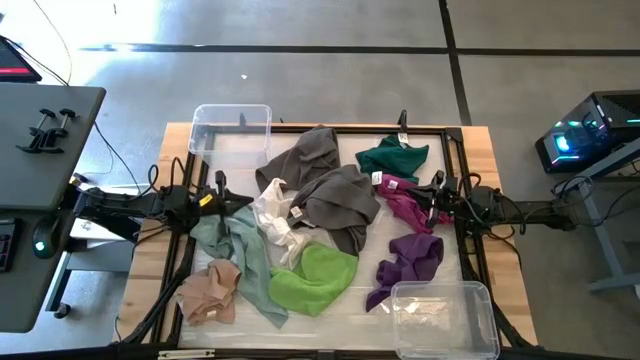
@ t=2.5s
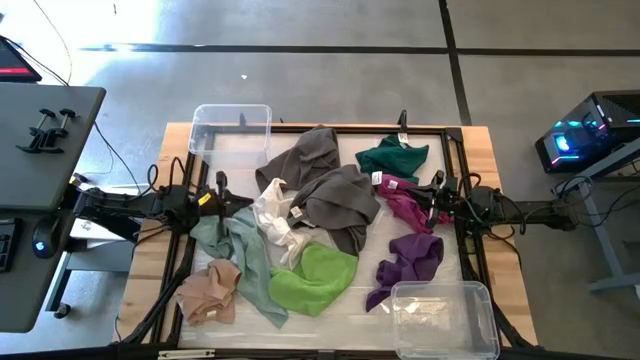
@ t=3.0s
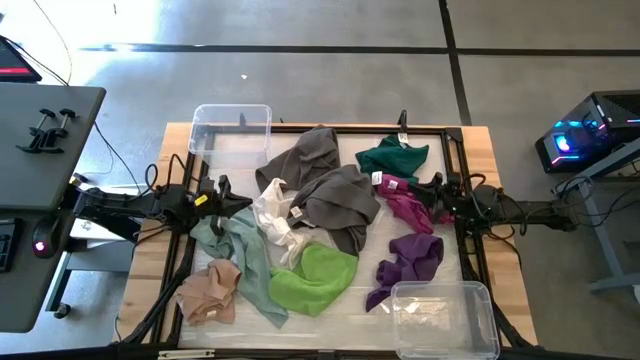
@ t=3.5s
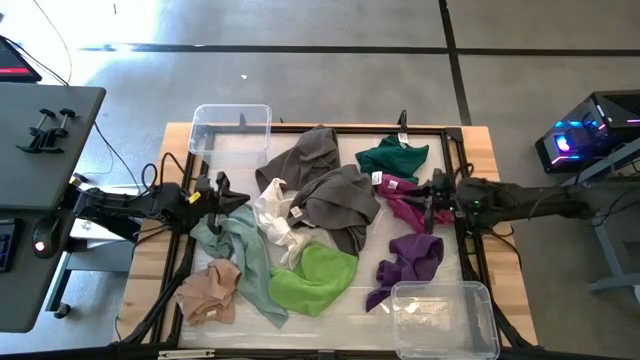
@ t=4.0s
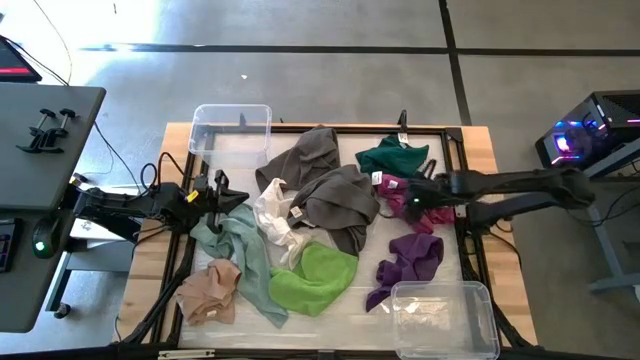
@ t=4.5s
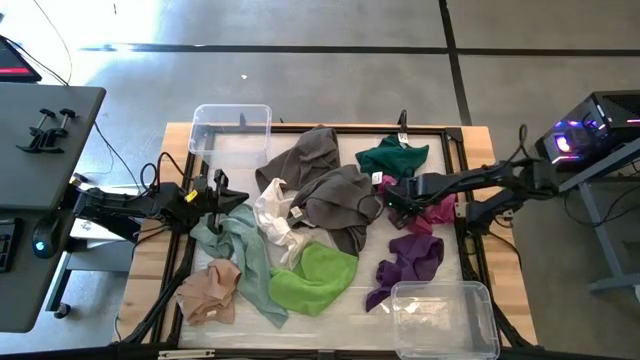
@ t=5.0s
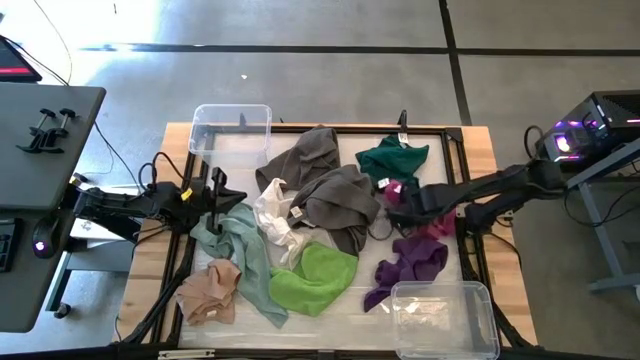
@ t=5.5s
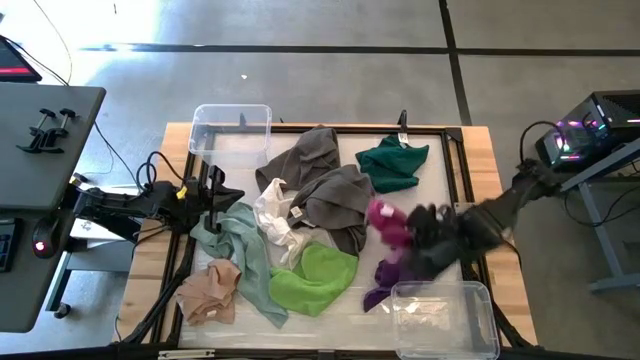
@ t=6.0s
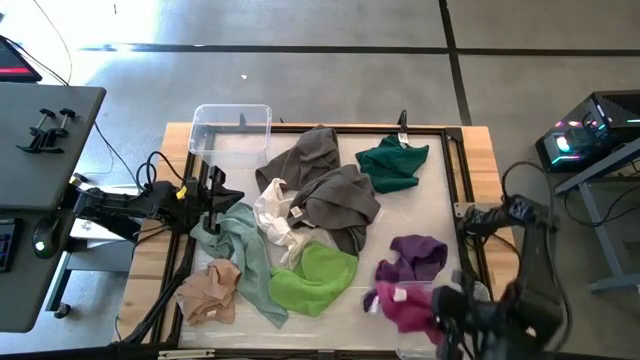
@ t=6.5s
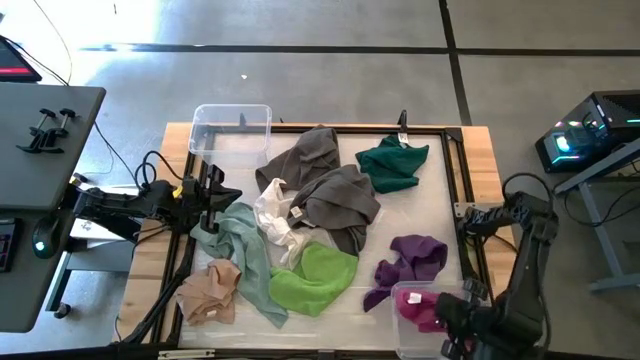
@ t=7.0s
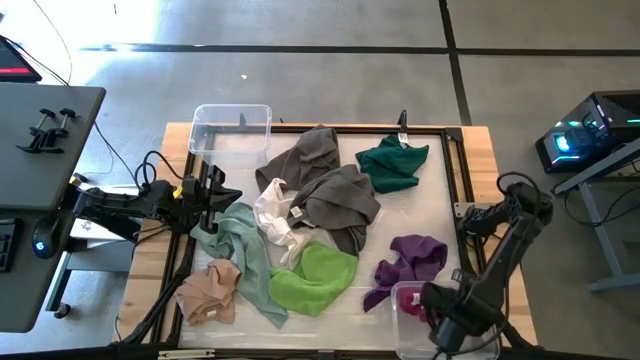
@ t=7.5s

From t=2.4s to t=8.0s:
Task: Sort towels by color in basket
Put the pink towel into the bottom transparent bin

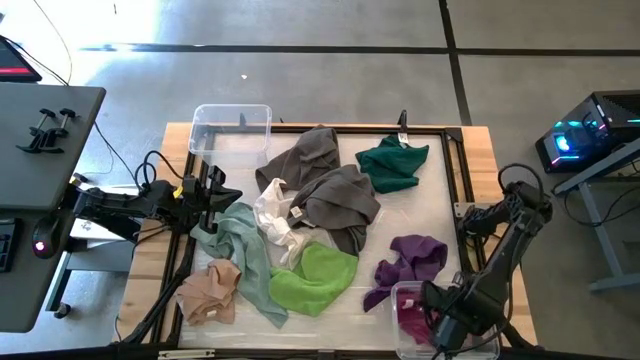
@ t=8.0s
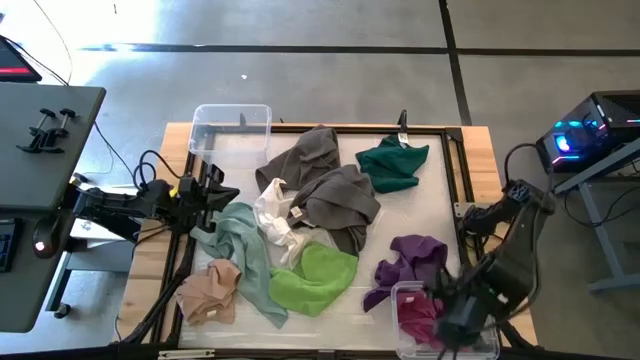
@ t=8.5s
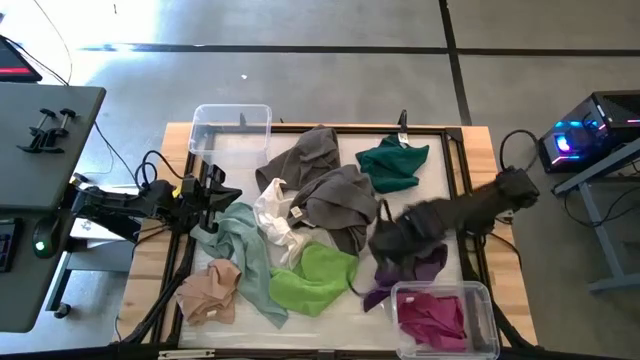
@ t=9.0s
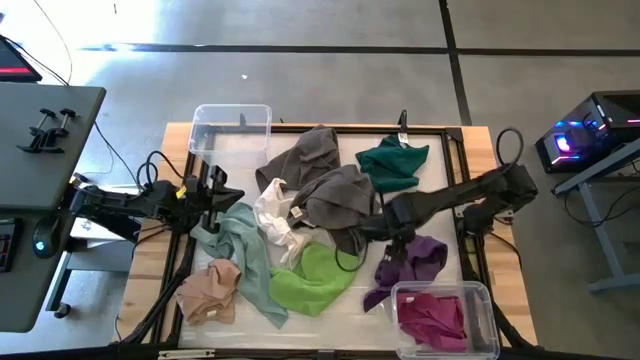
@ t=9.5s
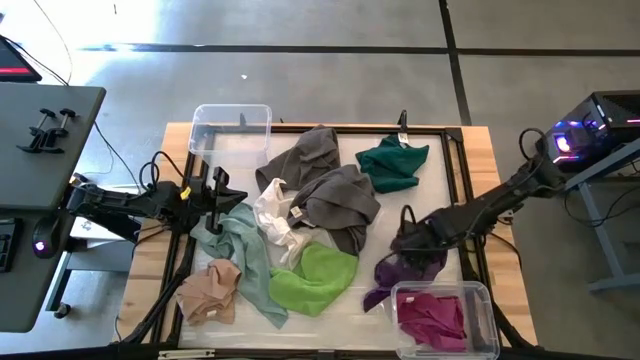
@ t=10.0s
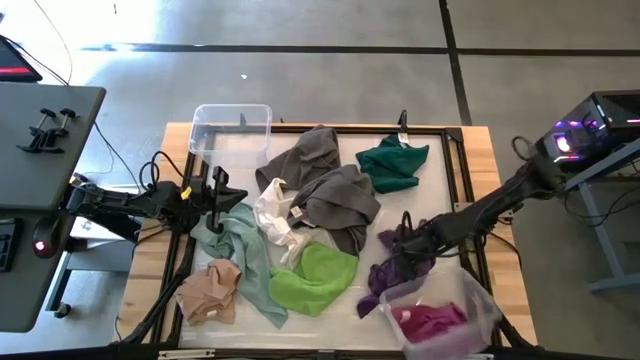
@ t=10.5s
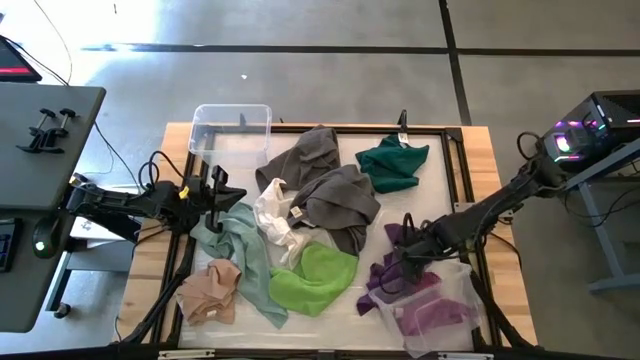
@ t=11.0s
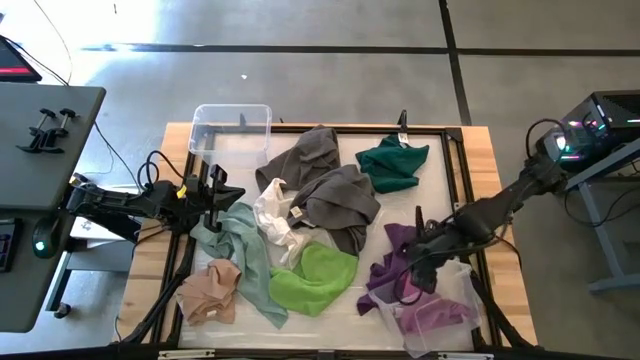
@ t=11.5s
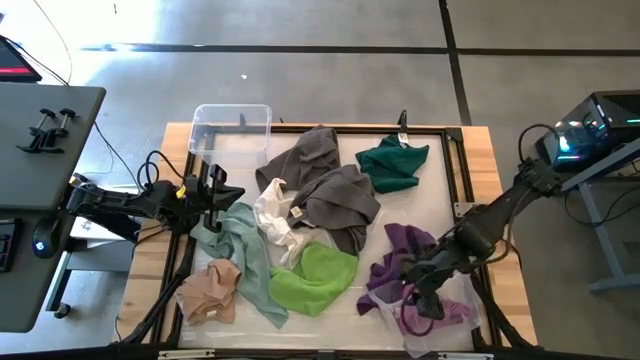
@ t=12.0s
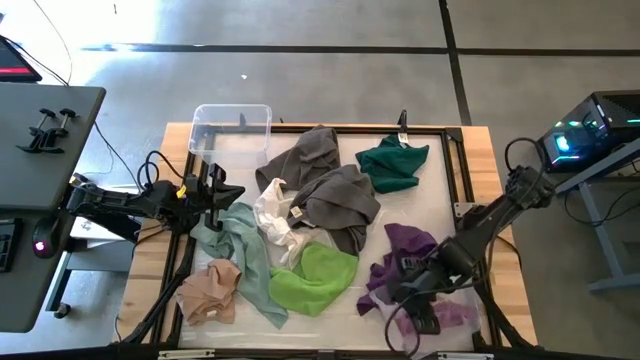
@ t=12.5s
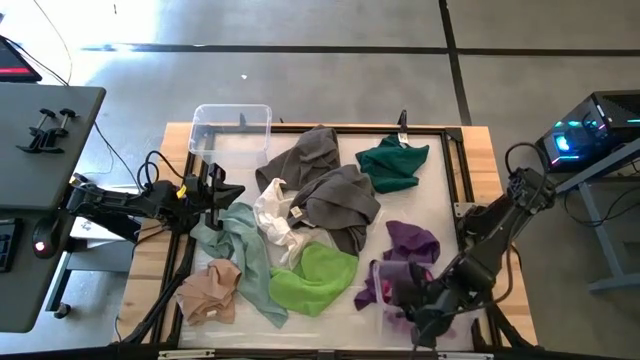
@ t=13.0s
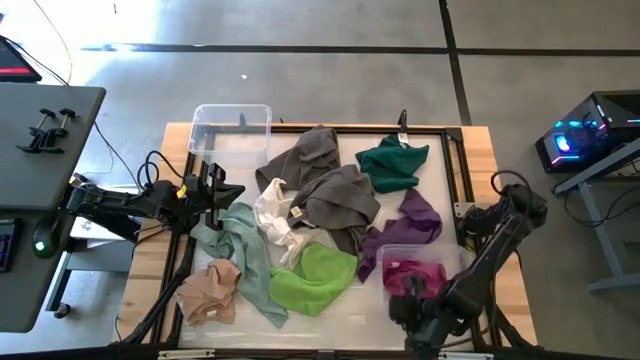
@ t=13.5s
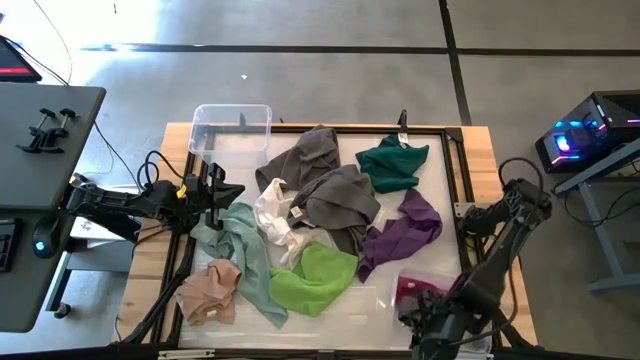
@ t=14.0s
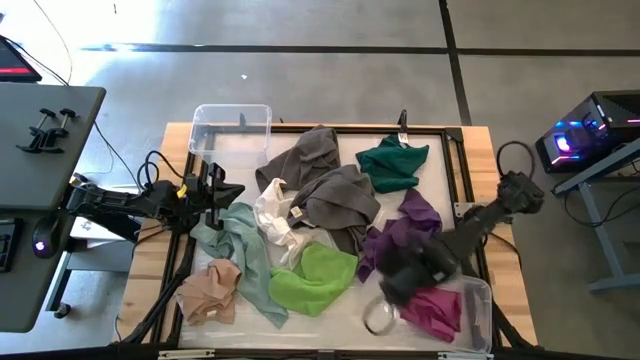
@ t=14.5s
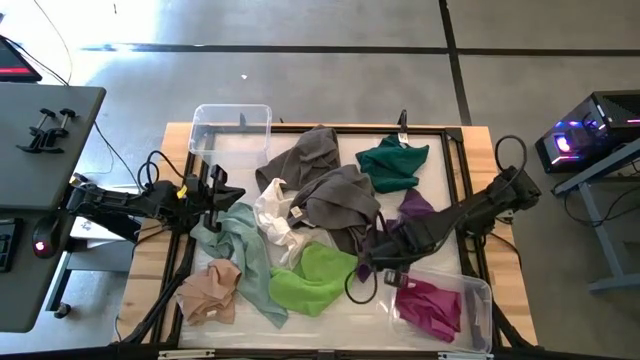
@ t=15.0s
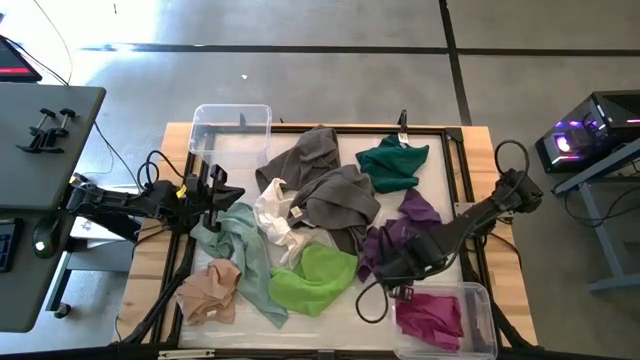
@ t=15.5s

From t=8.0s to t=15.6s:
Adjust the bottom transparent bin

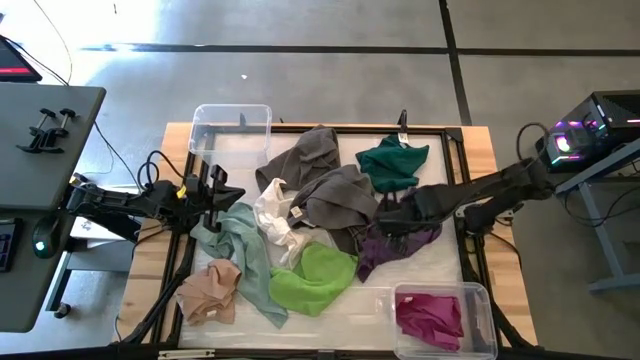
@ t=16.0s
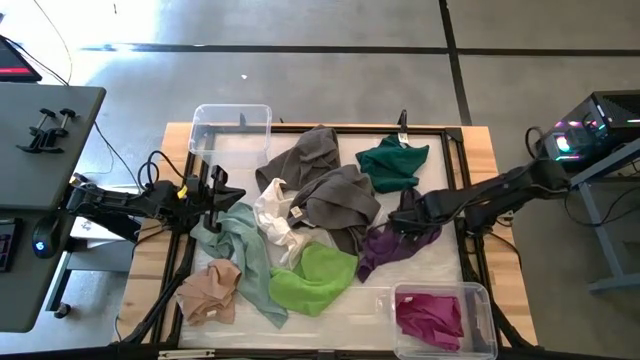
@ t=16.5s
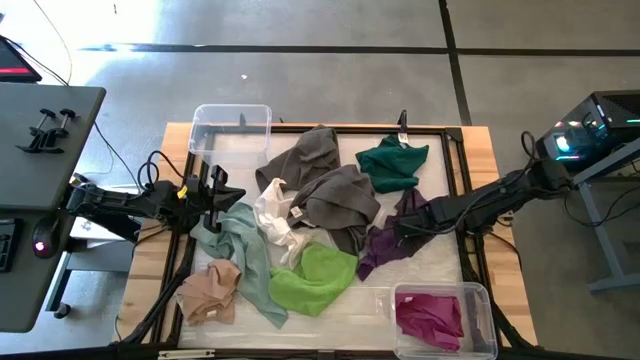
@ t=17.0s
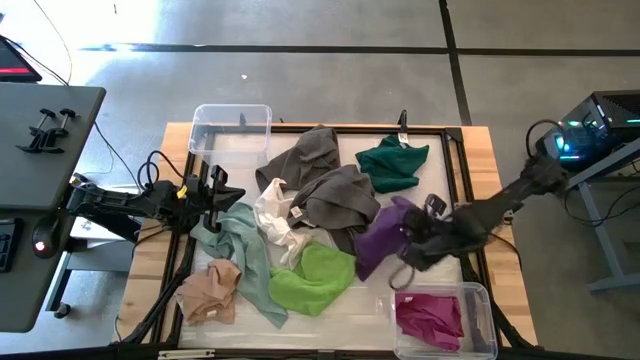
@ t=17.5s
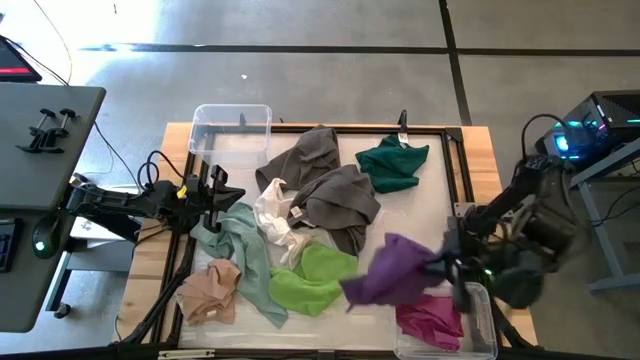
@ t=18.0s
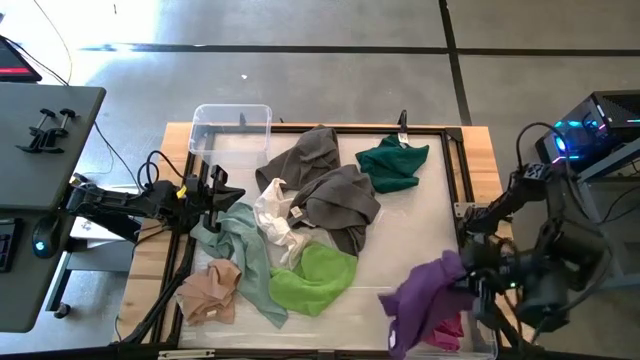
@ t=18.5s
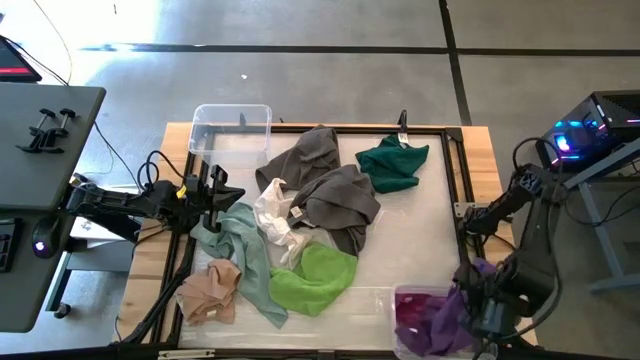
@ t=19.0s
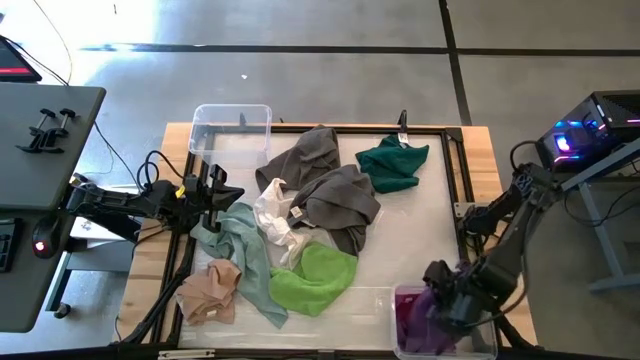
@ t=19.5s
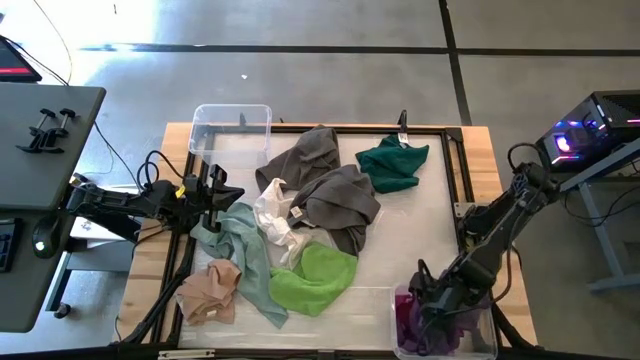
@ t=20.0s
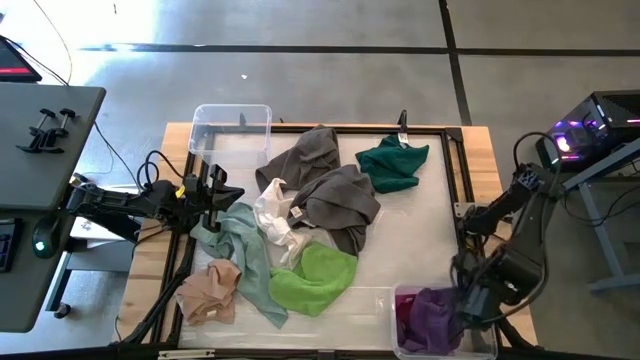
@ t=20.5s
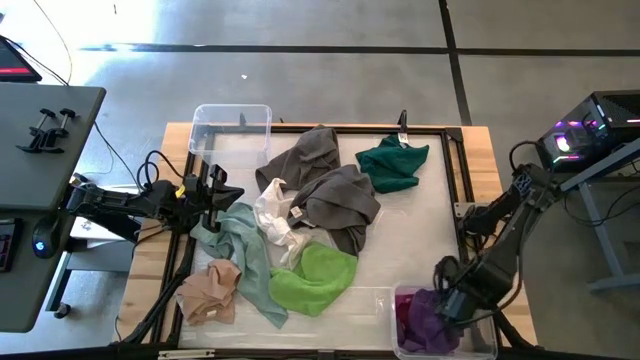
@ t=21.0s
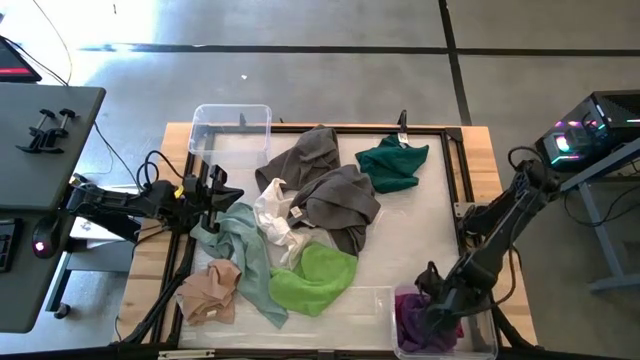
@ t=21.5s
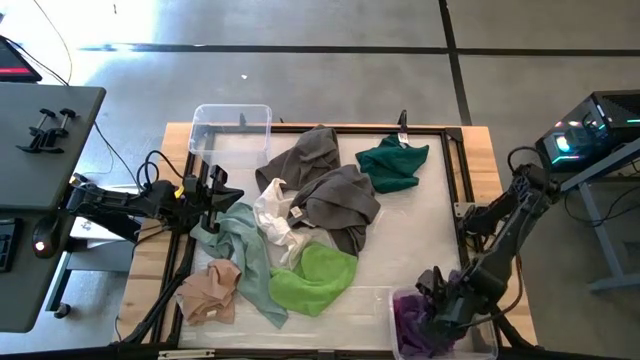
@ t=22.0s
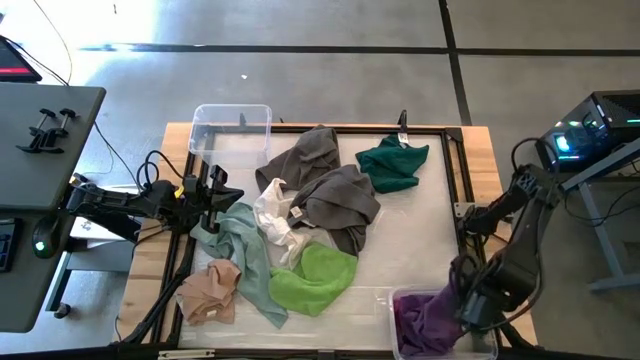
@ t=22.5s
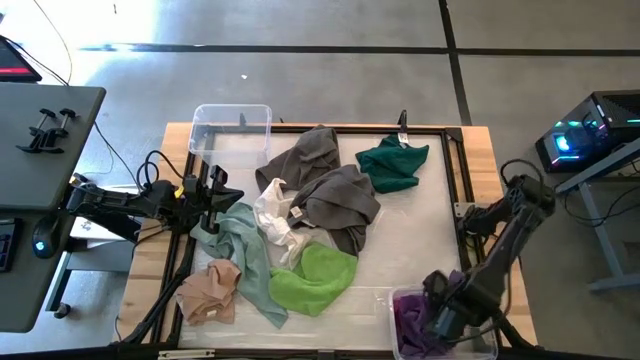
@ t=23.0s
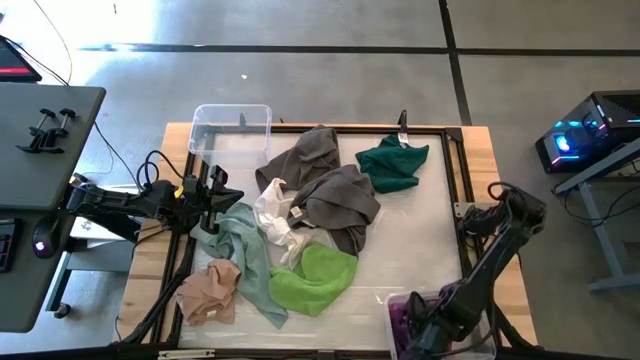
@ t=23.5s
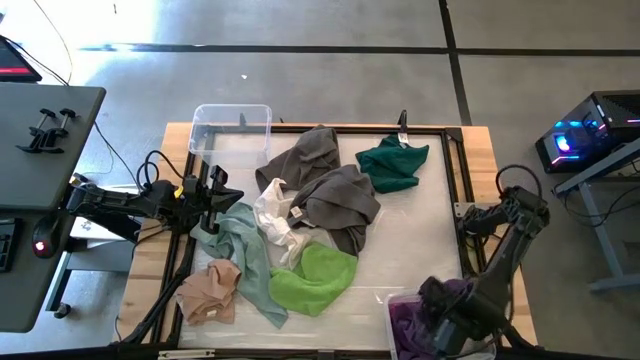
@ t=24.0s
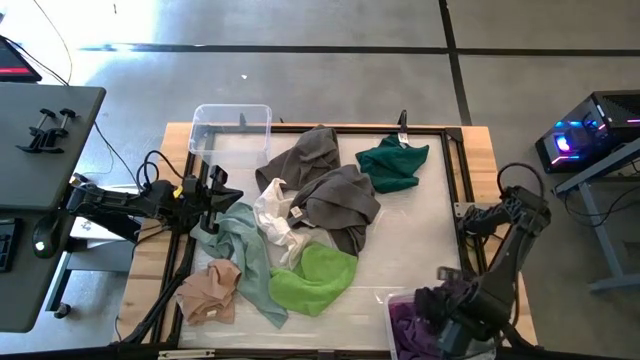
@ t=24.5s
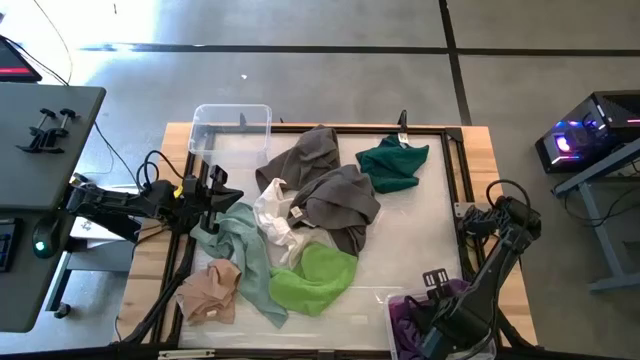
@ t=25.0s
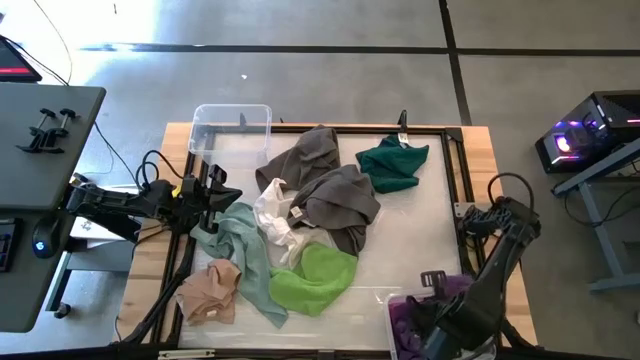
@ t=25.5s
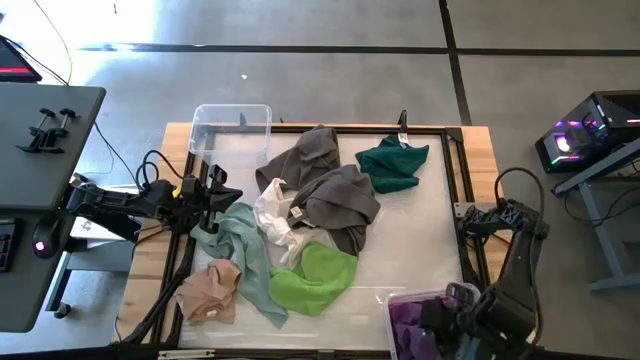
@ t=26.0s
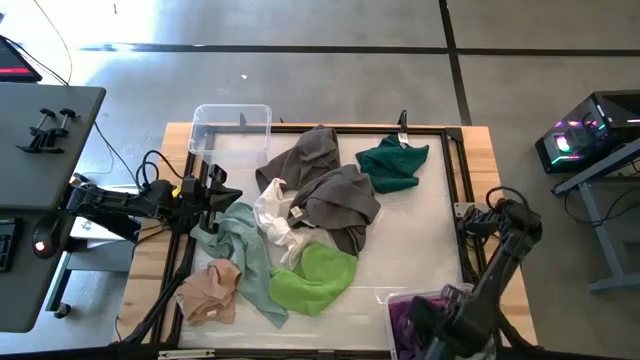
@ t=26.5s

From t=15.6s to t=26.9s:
Put the purple towel into the bottom transparent bin
